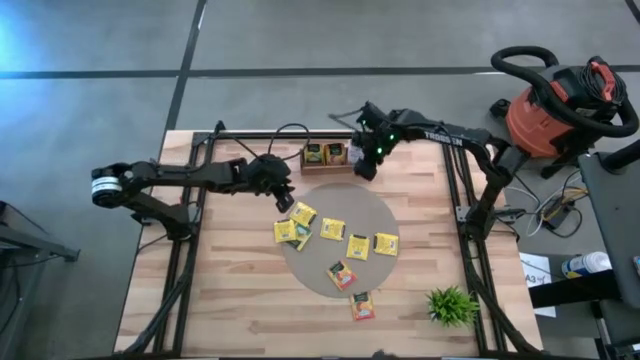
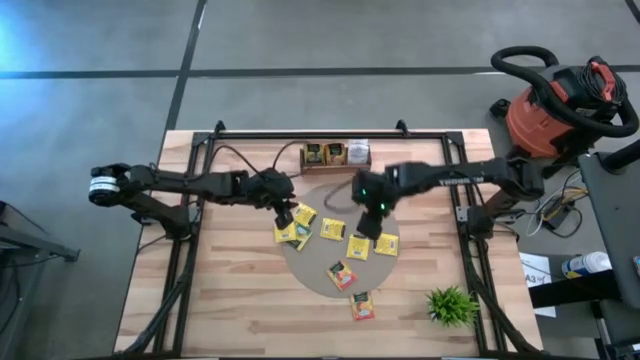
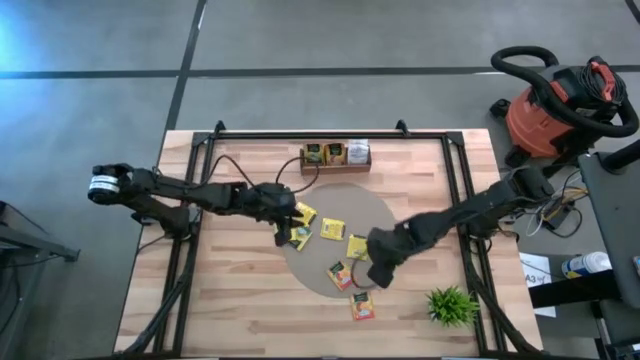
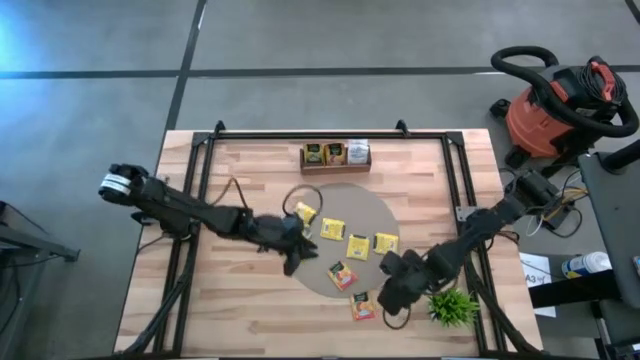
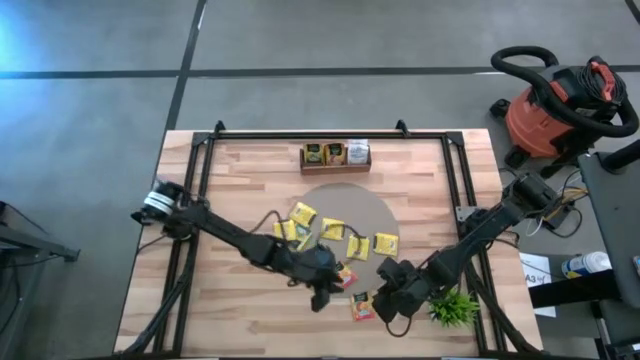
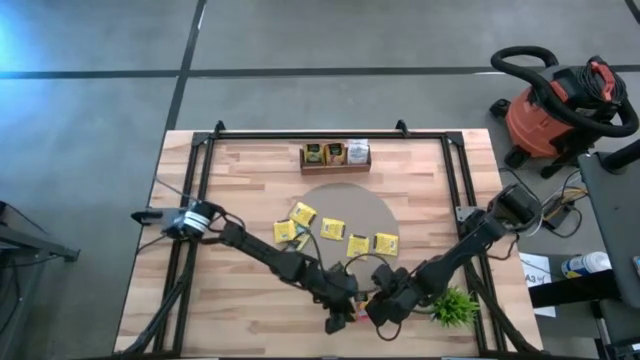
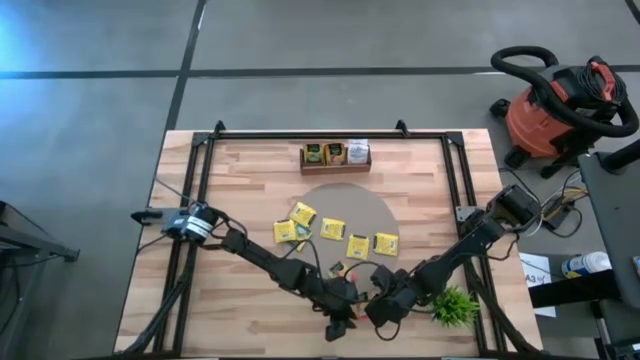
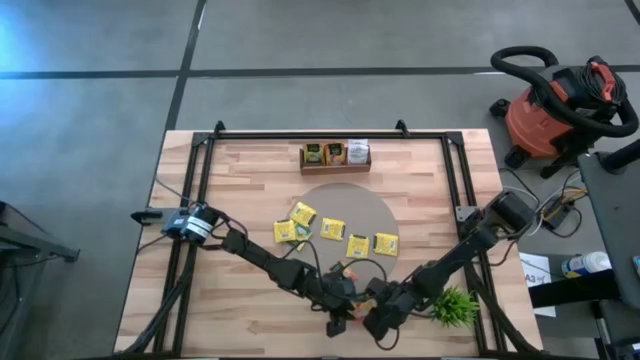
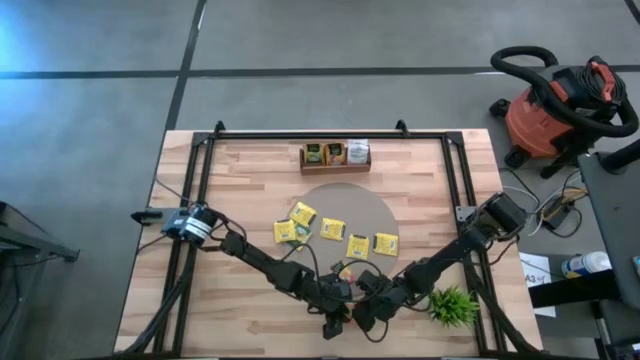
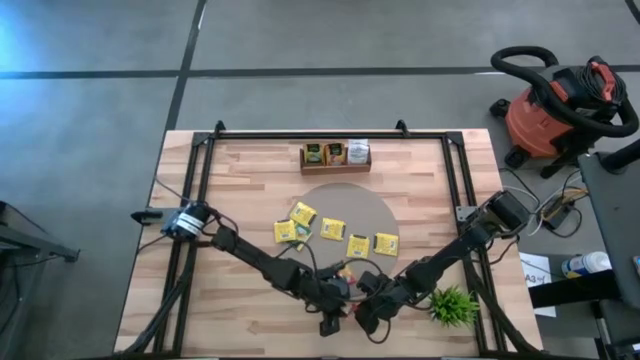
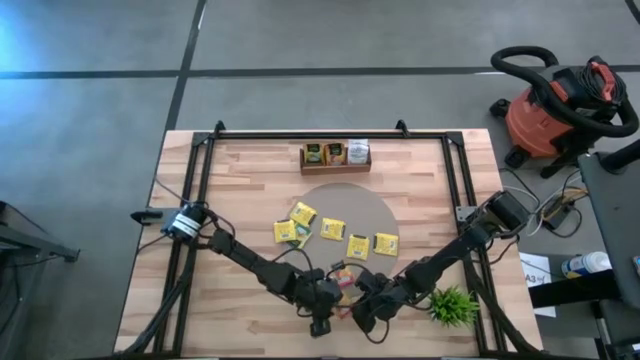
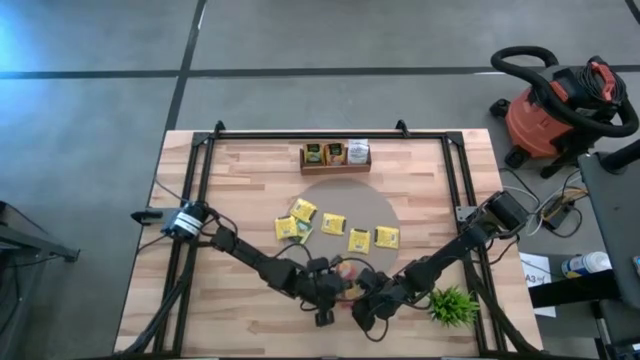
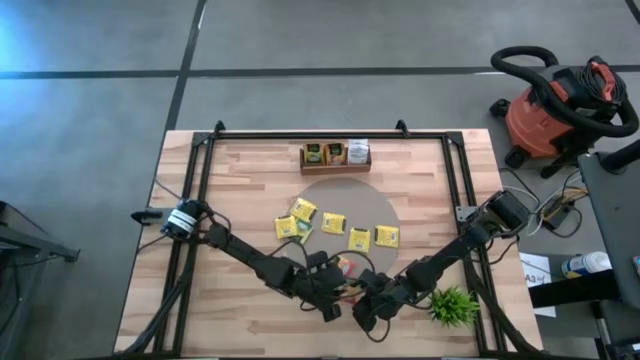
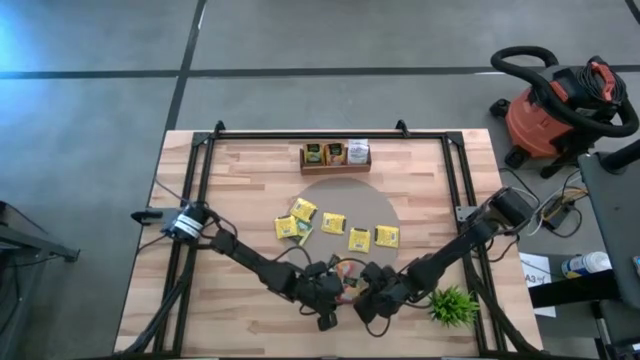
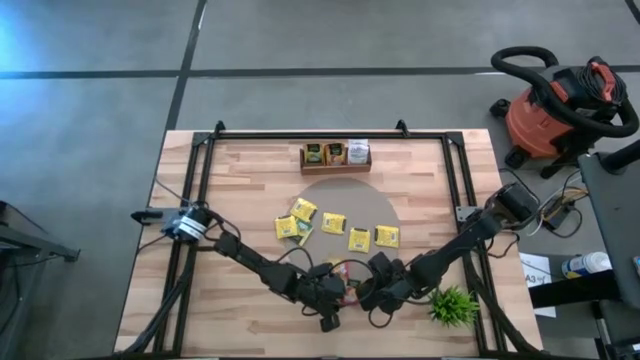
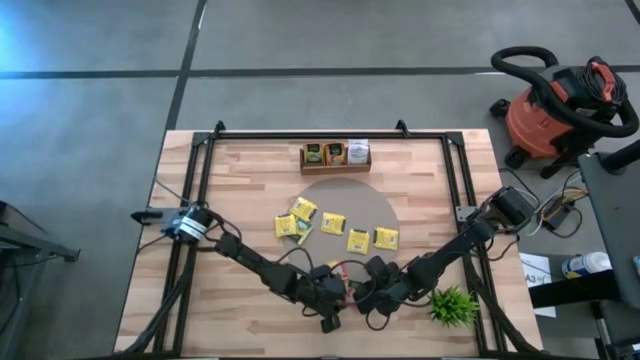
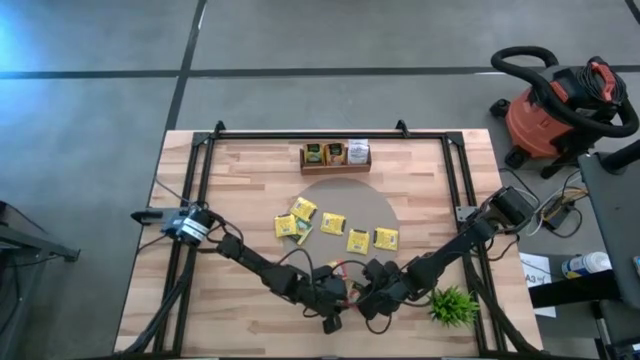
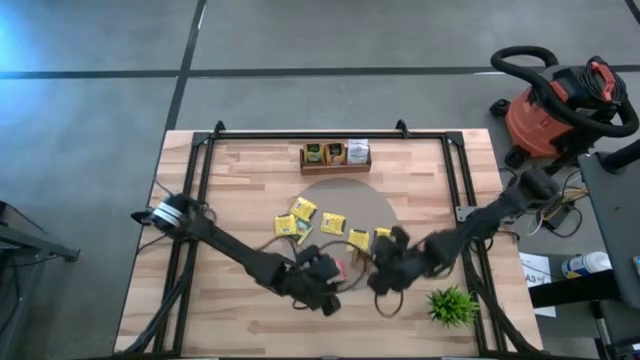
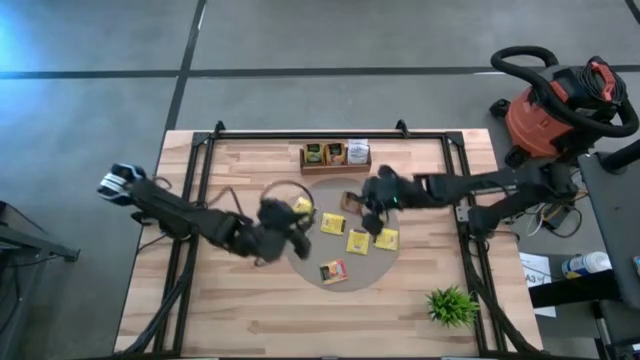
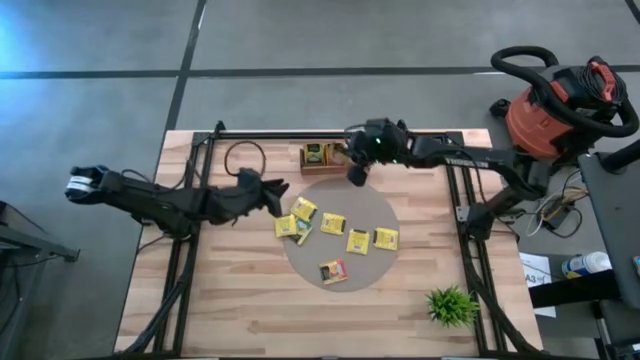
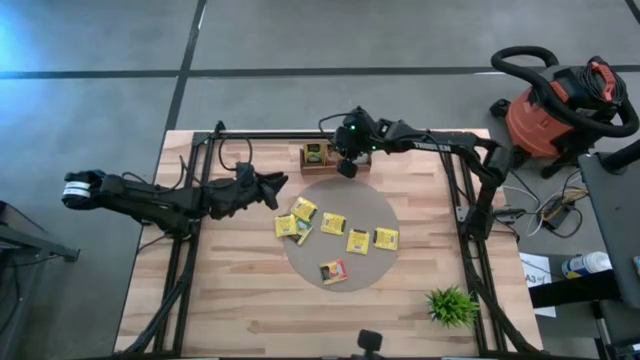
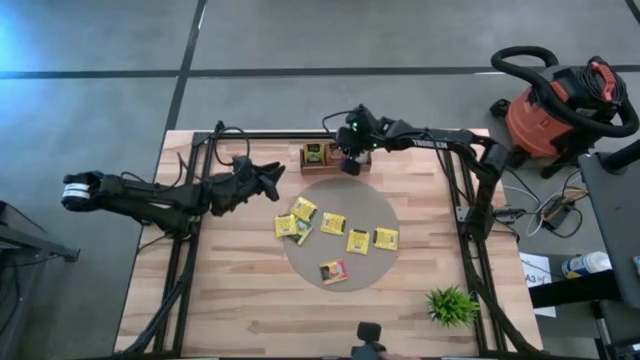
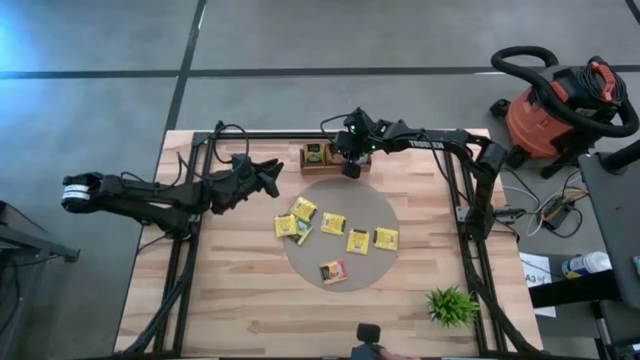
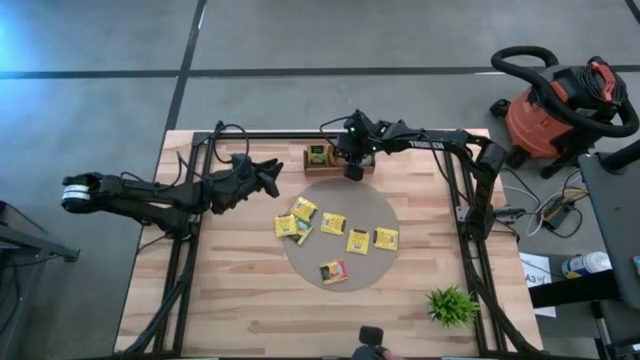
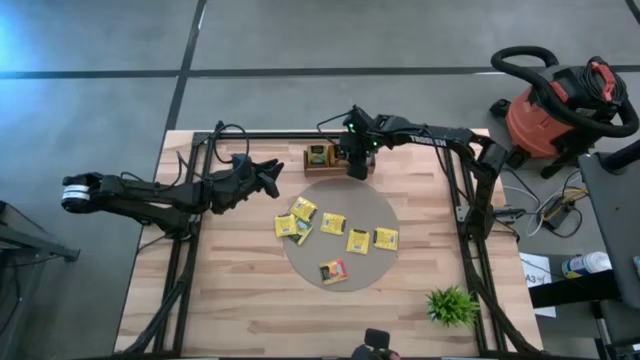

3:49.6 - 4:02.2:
Task: Pick & Place Tea
Put the bottom orange tea bag into the middle compartment of the wooden organizer

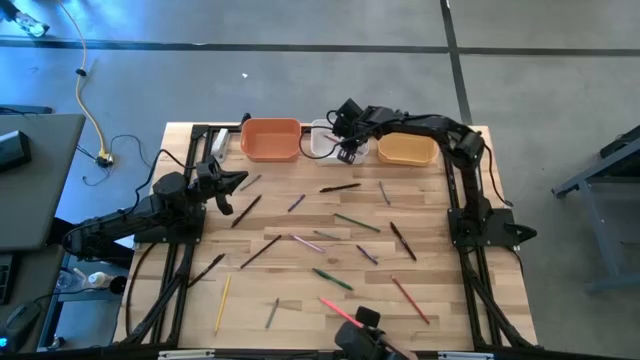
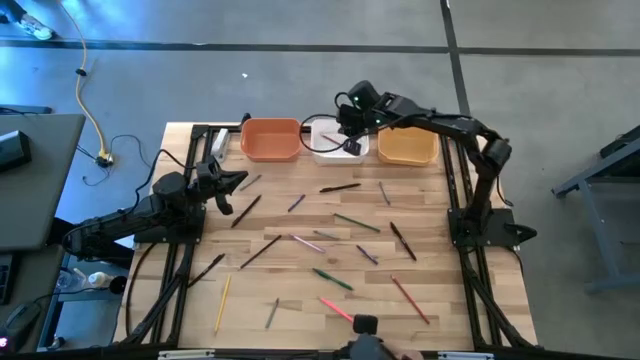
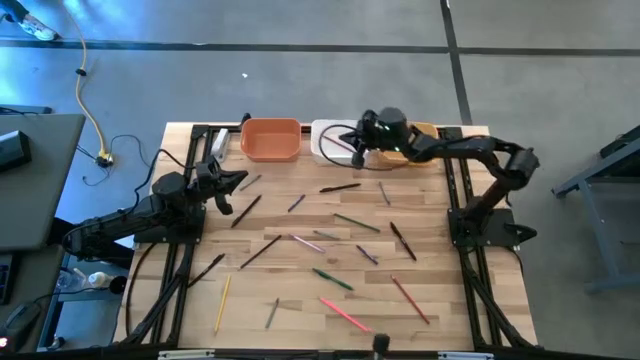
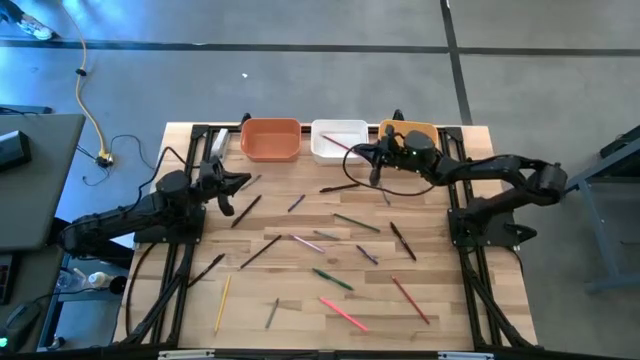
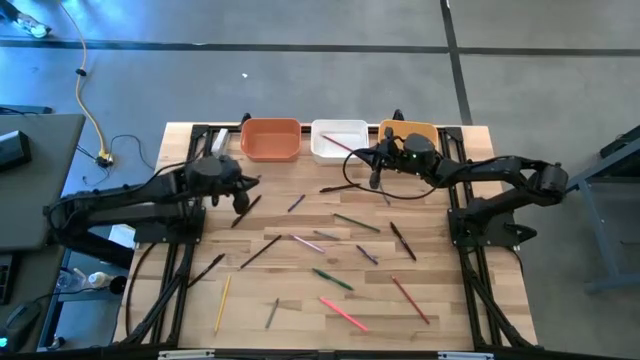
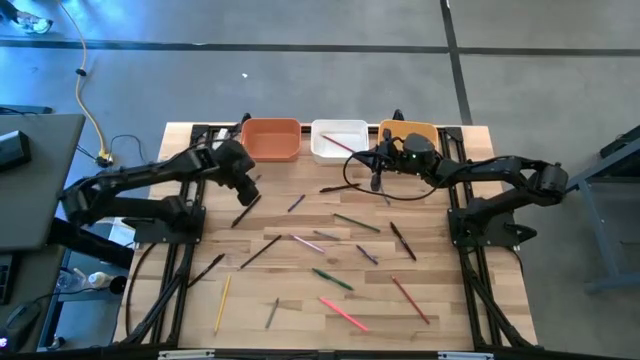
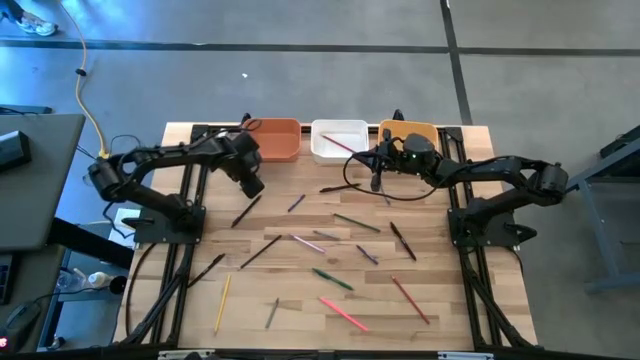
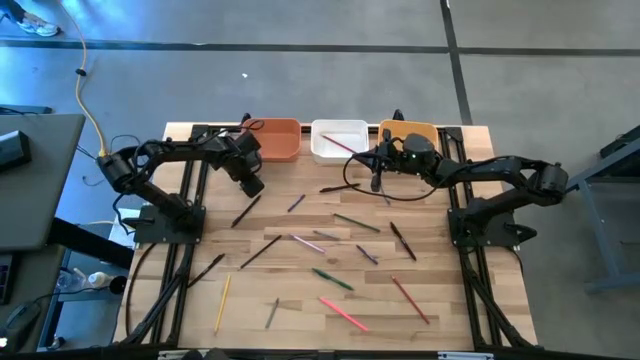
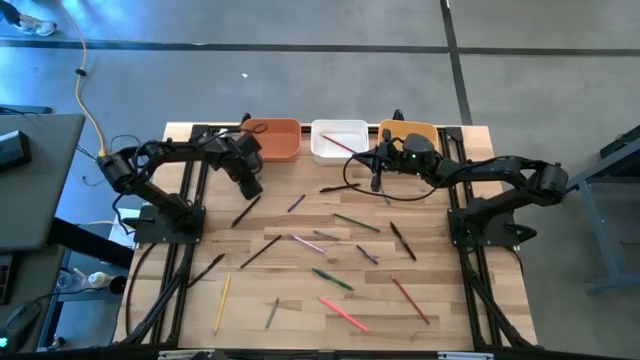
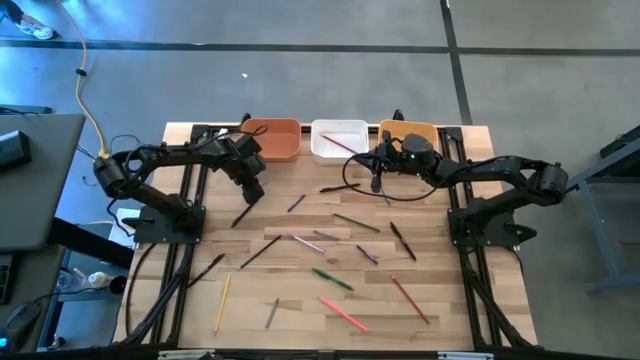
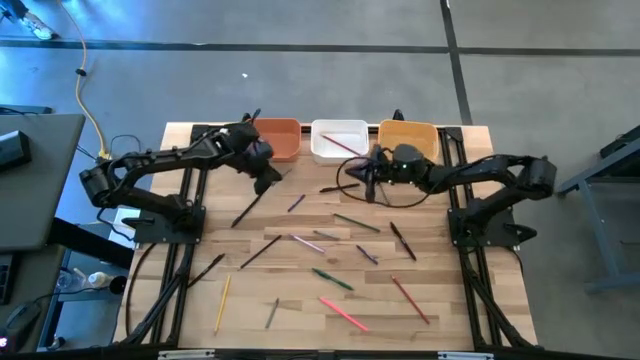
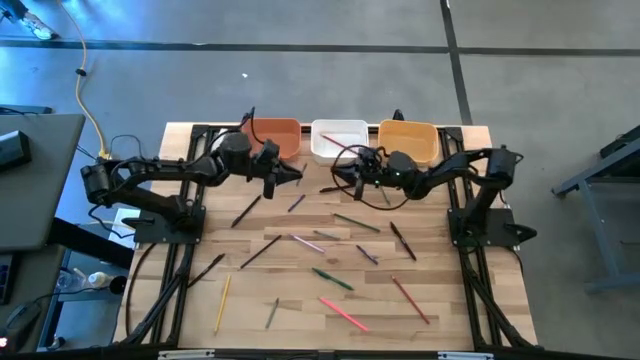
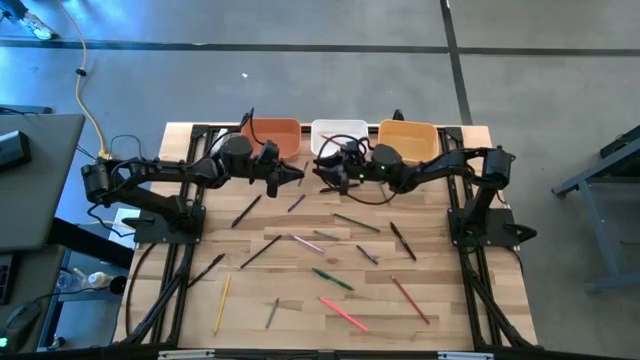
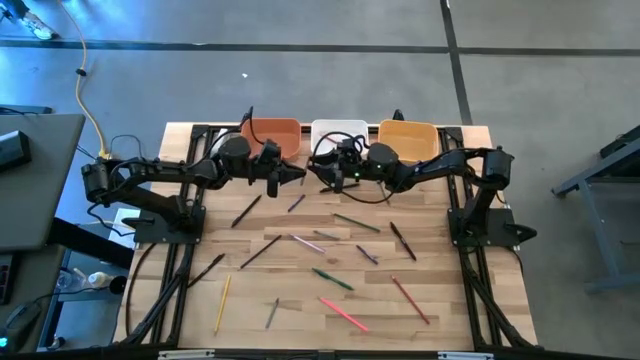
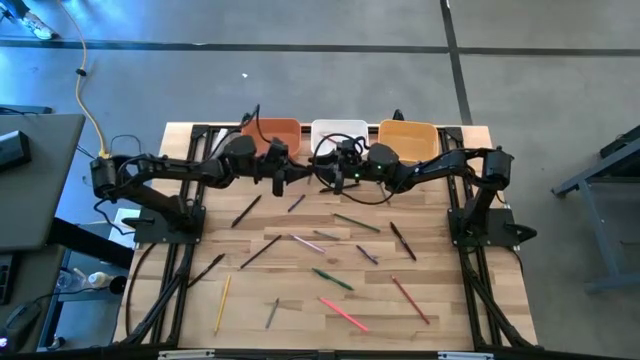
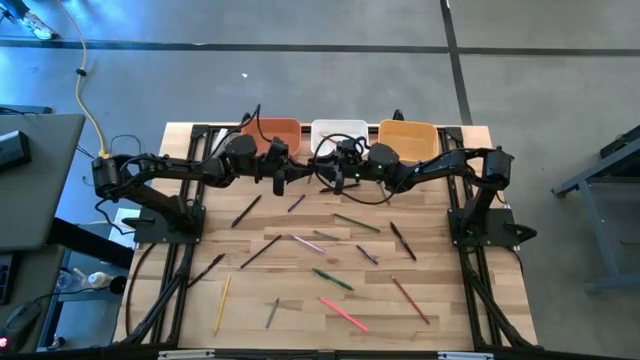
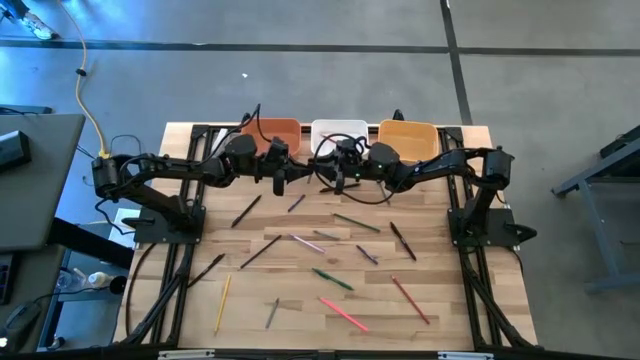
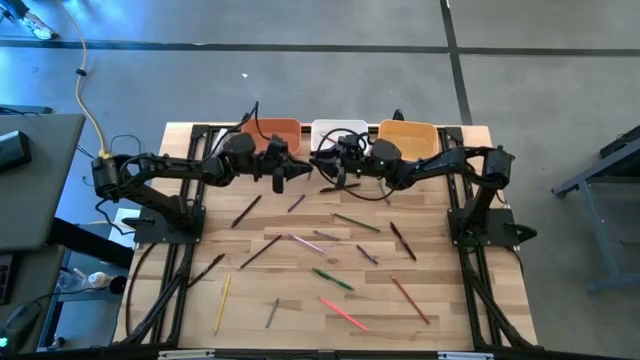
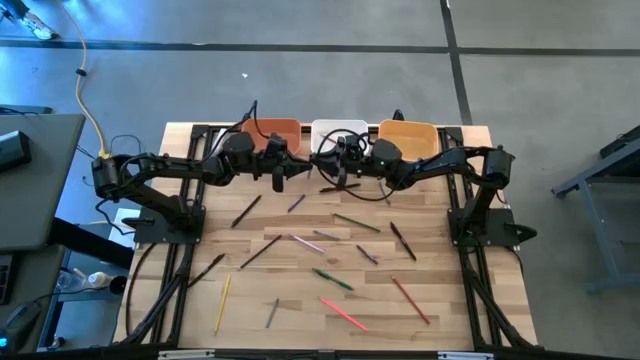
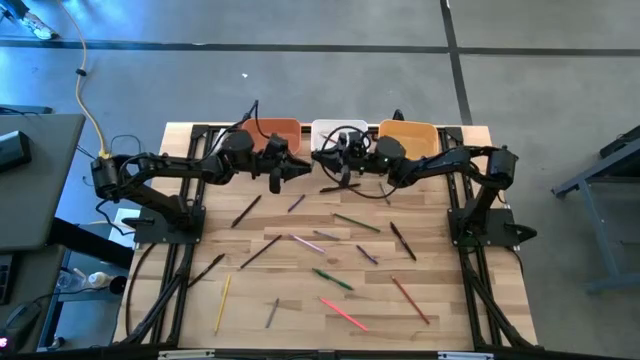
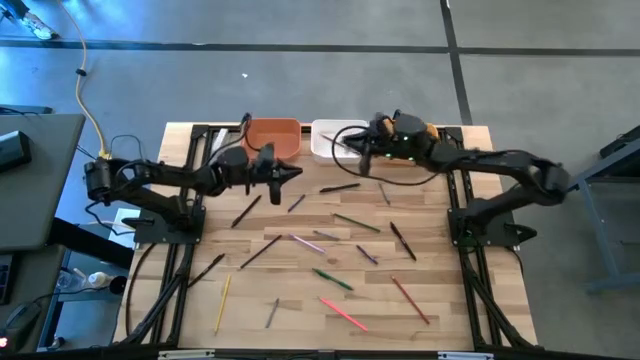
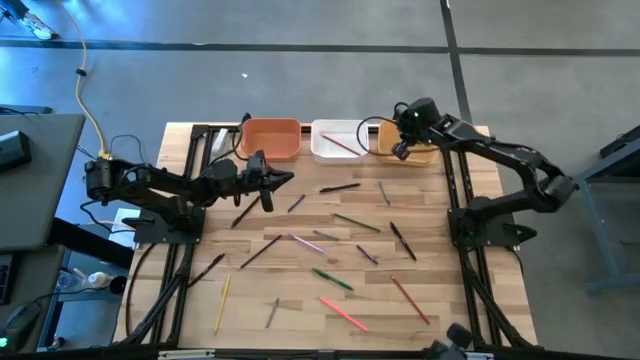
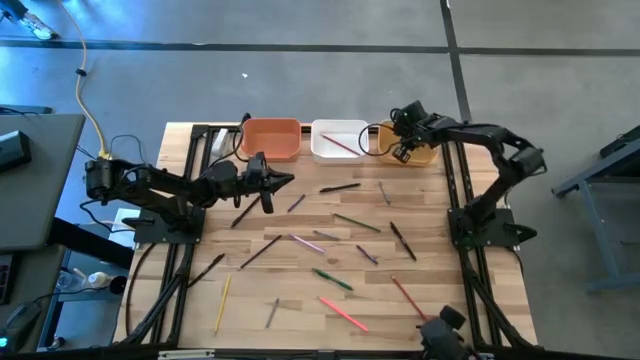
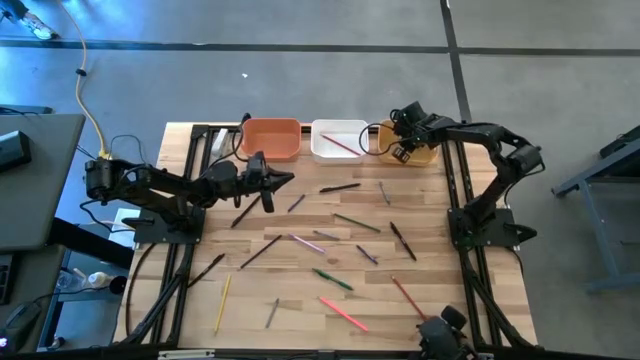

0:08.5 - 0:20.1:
Task: Sort crayons/erasers/pens/pencils in bins
Put the top left gray crayon into the yellow bin
